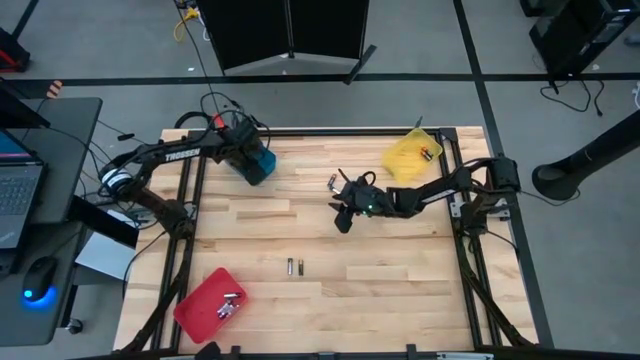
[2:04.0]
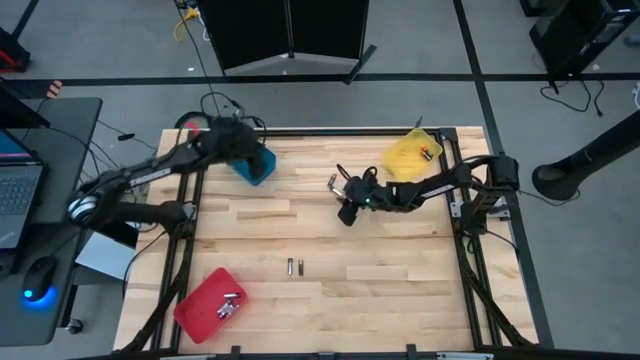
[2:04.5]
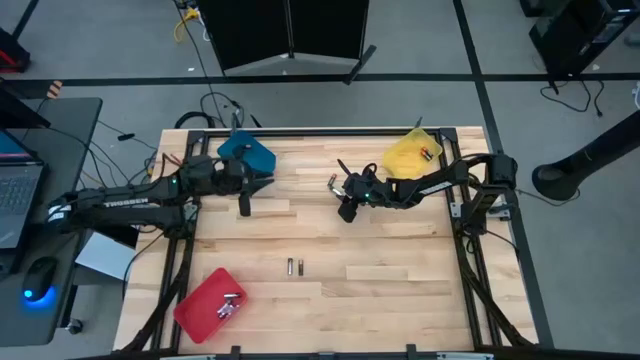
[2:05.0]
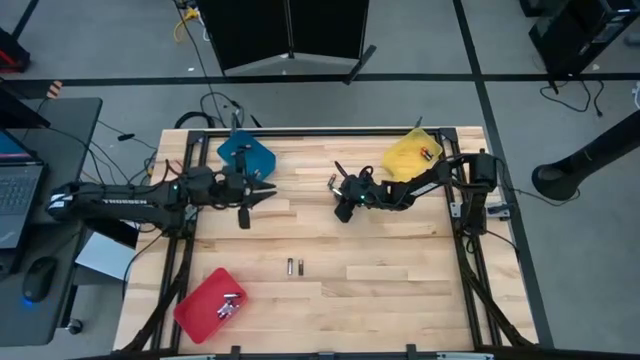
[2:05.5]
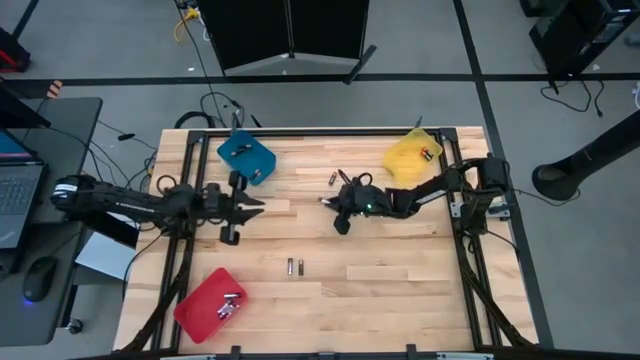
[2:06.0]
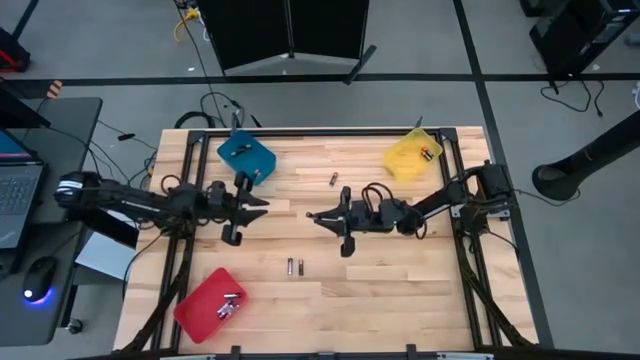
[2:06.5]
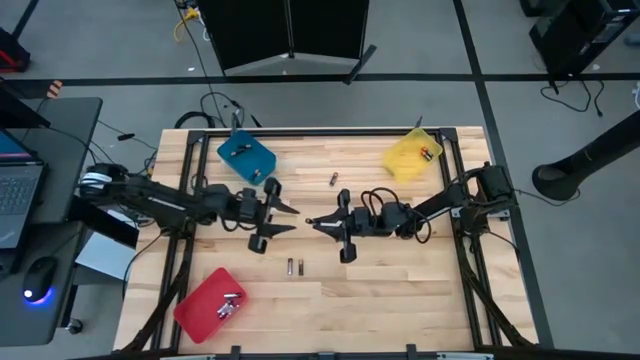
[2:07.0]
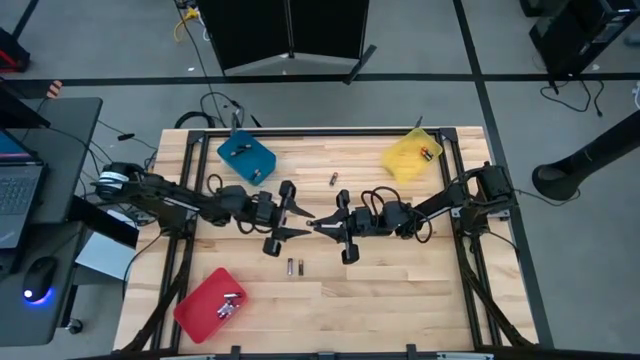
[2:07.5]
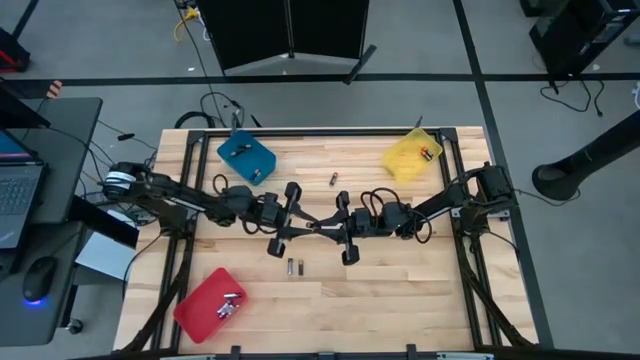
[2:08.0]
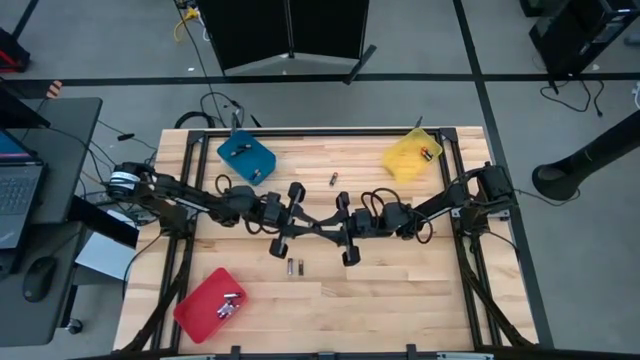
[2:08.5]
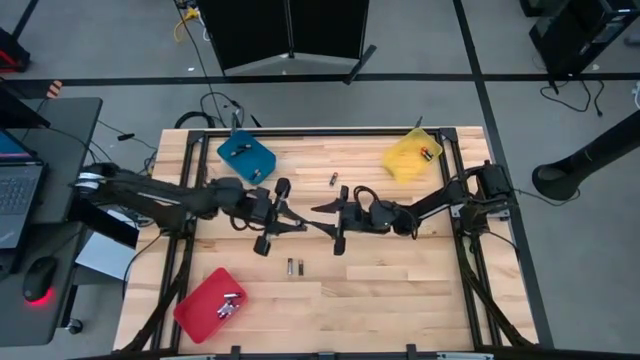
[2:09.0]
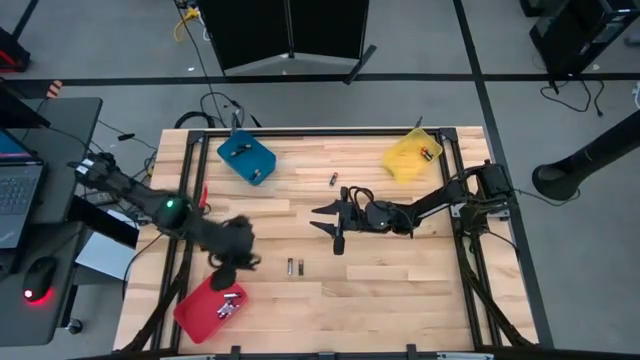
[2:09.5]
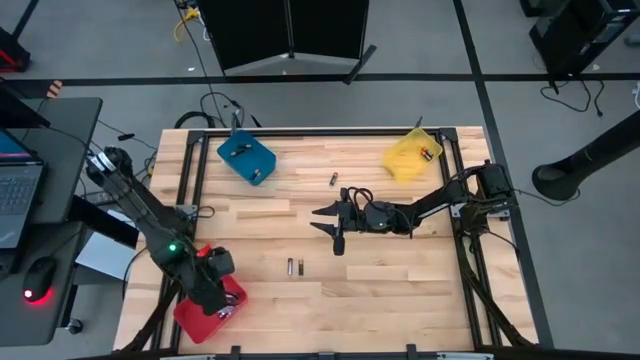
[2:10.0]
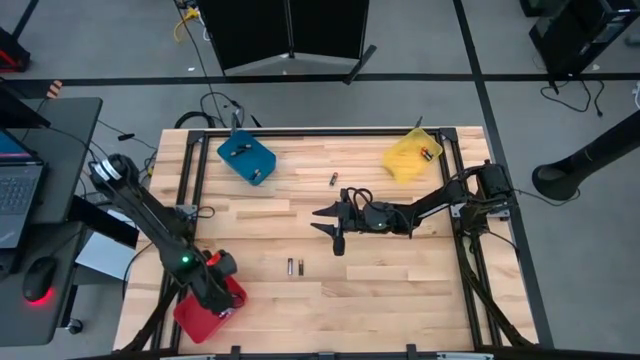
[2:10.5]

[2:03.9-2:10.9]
Task: Sort batteries
Put the top black silver battery into the red bin

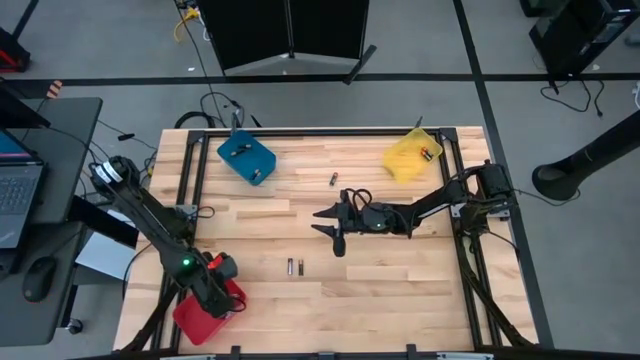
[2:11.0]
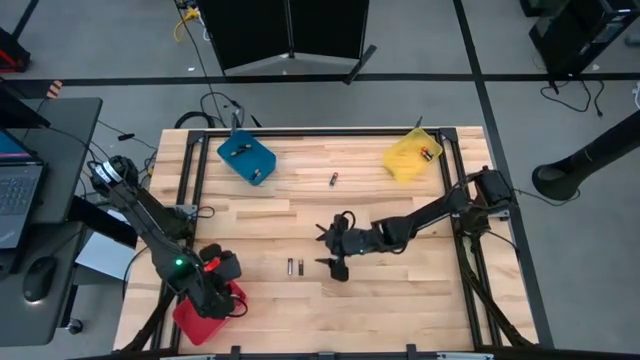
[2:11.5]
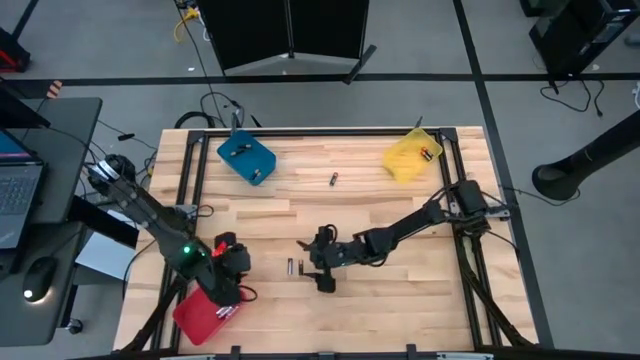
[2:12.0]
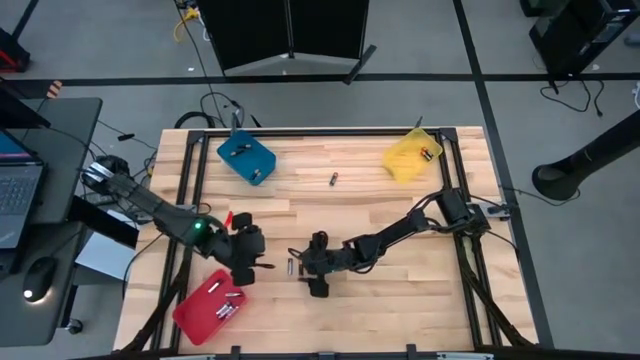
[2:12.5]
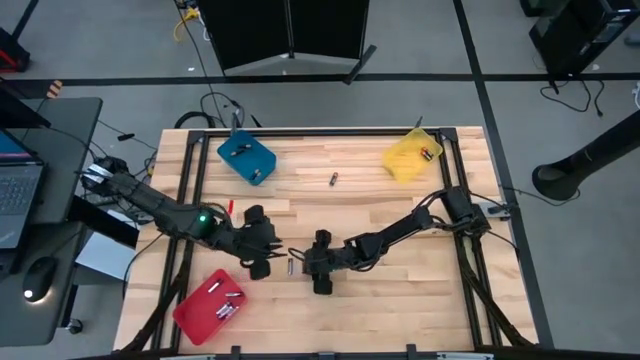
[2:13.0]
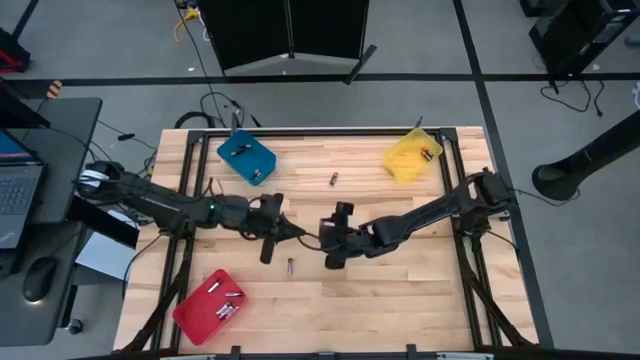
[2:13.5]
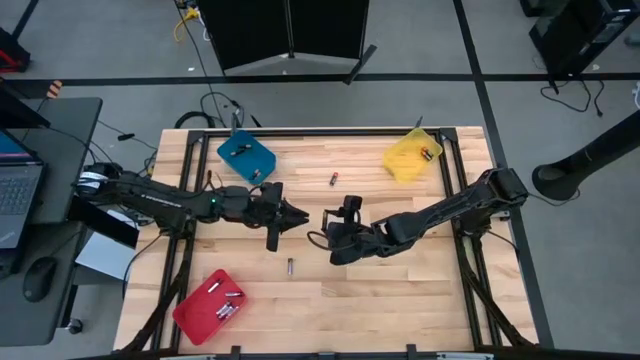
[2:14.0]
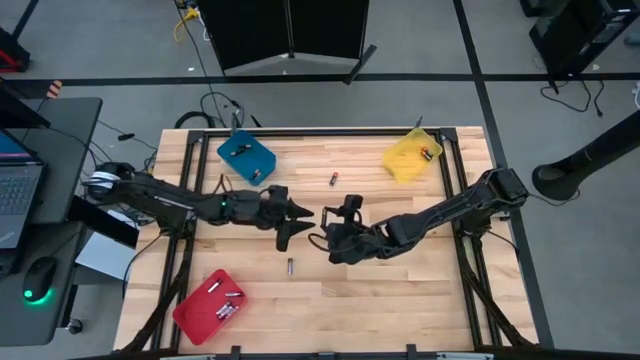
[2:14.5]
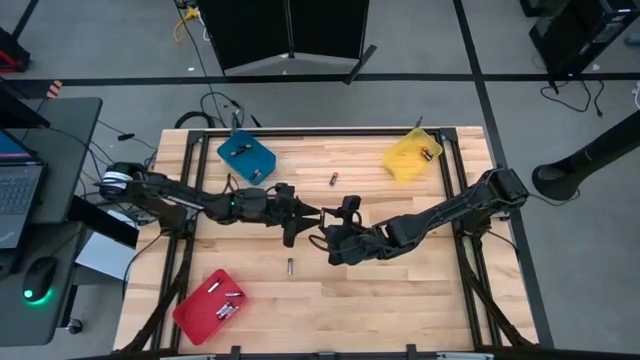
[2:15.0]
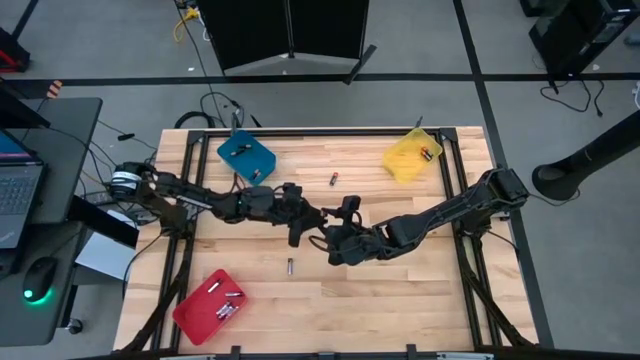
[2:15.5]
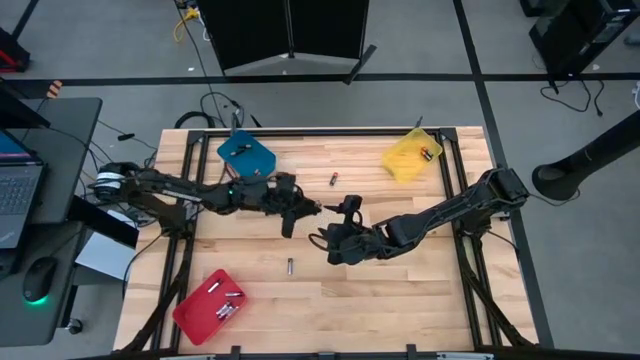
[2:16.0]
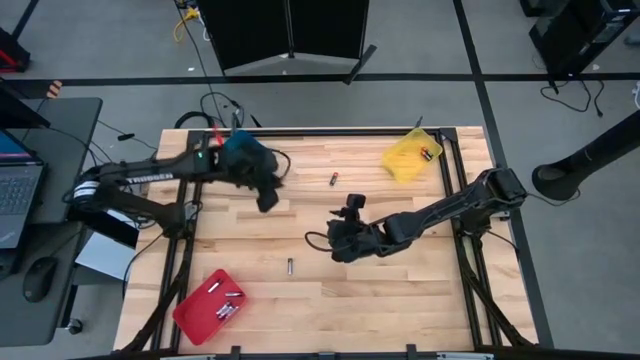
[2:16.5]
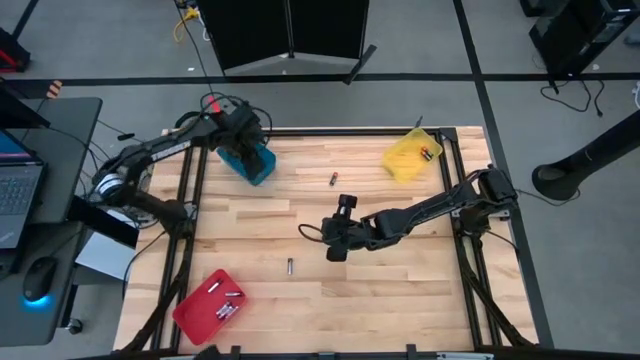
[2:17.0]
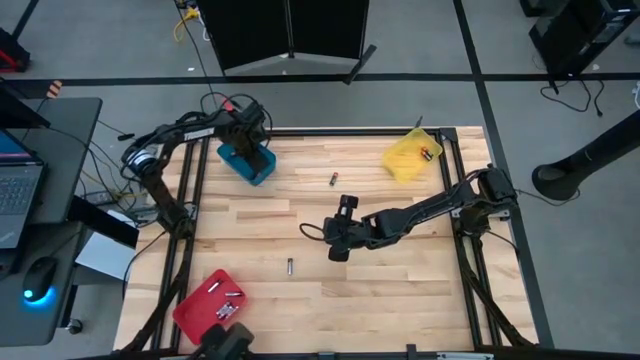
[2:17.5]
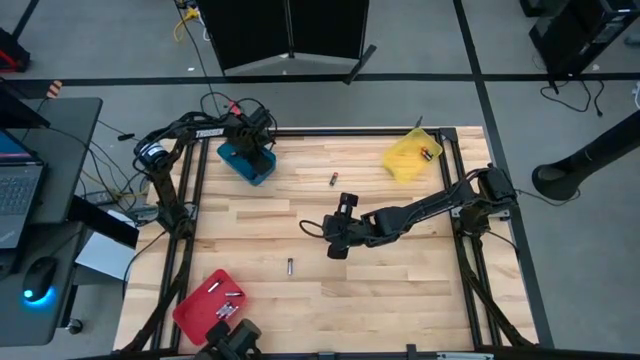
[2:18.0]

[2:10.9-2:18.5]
Put the black brown battery into the blue bin

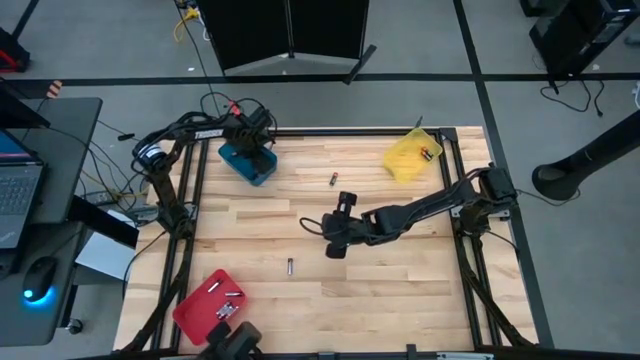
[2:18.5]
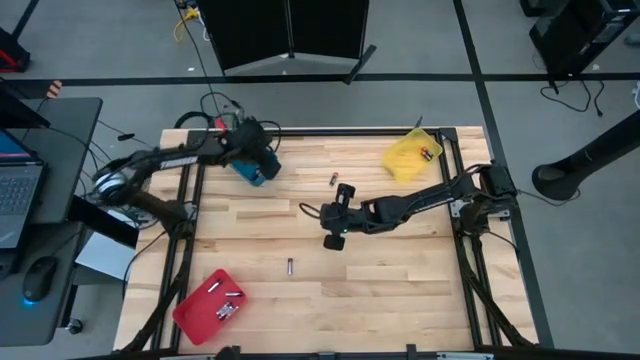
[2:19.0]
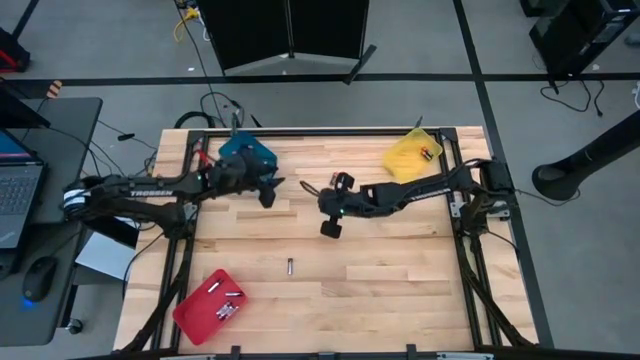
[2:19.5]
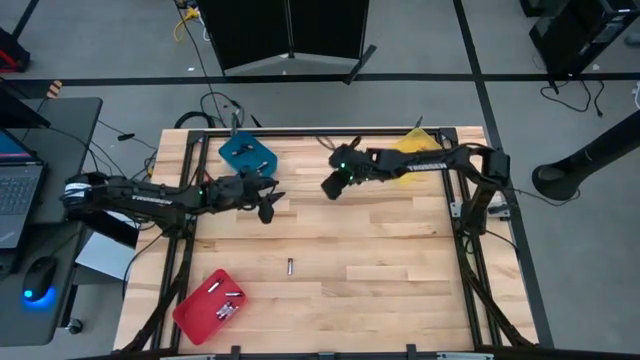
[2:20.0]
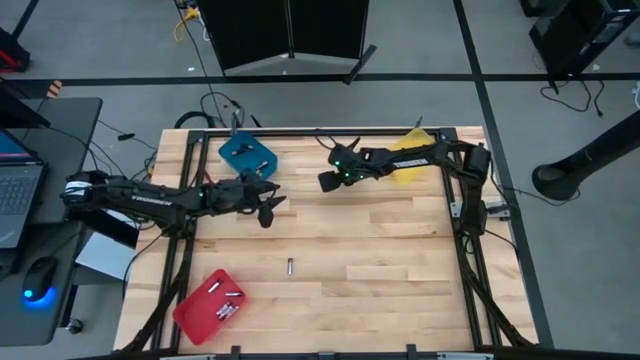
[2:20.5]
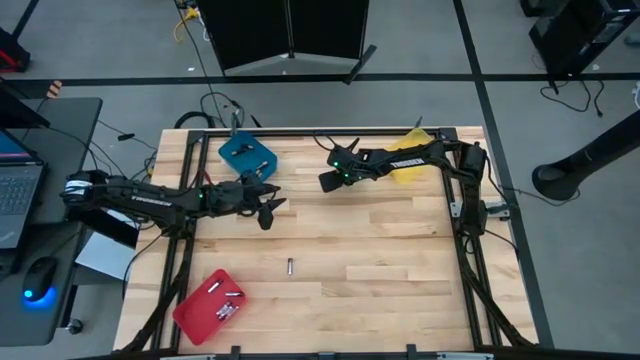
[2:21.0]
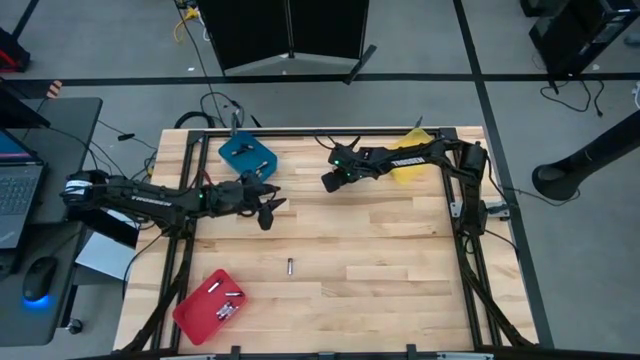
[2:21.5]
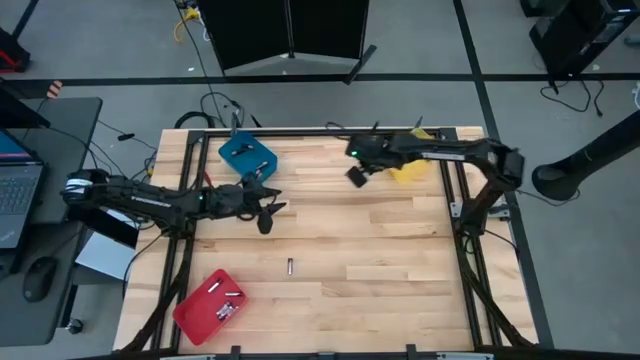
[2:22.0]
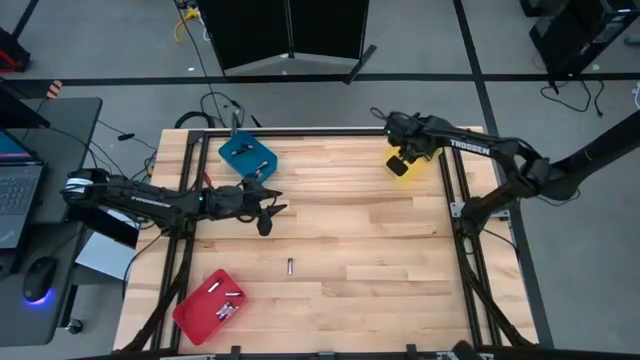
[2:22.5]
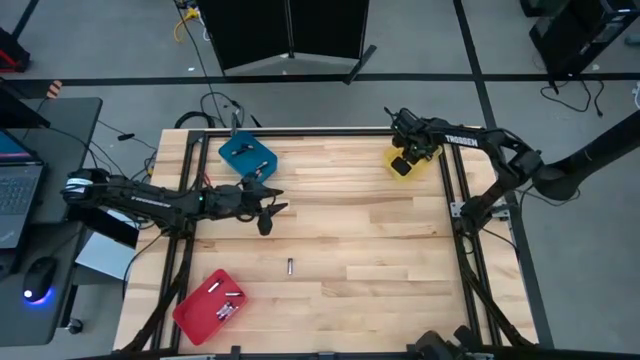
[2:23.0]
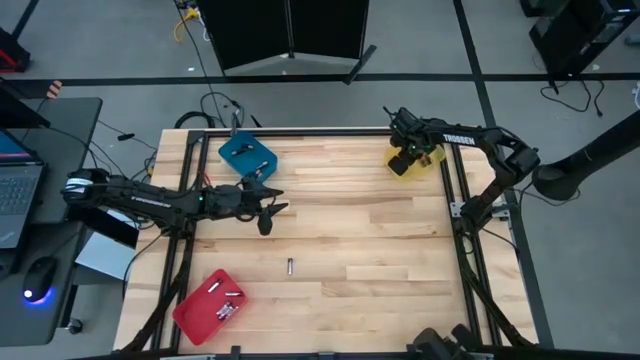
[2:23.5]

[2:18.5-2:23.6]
Put the black orange battery into the yellow bin

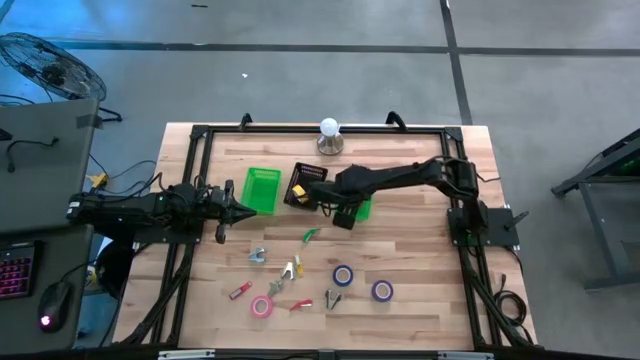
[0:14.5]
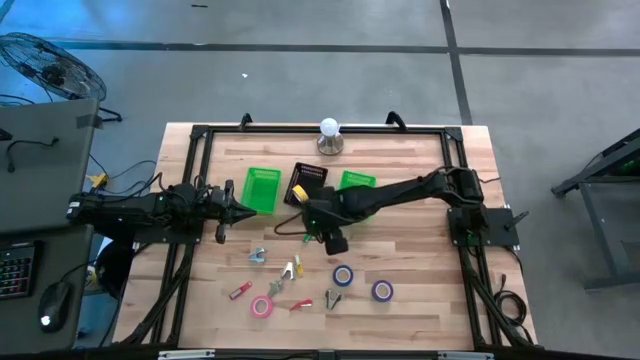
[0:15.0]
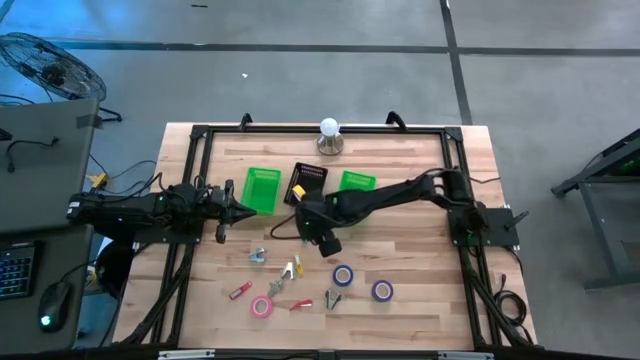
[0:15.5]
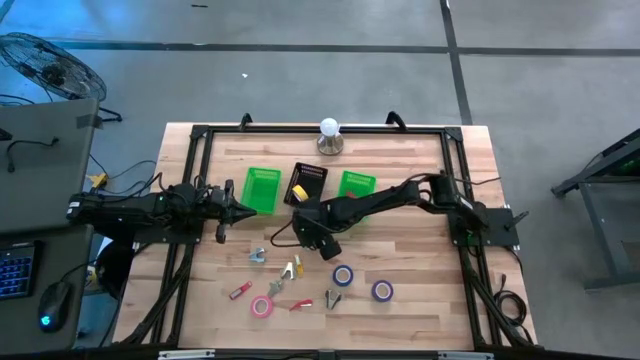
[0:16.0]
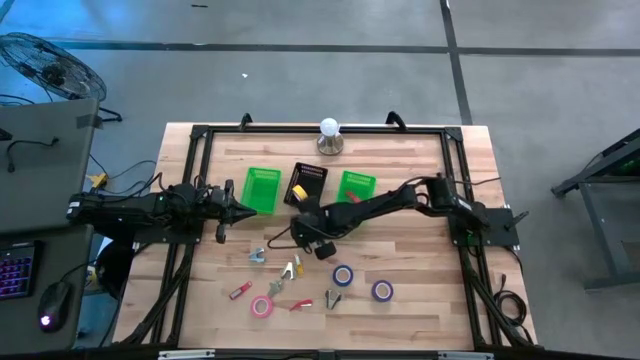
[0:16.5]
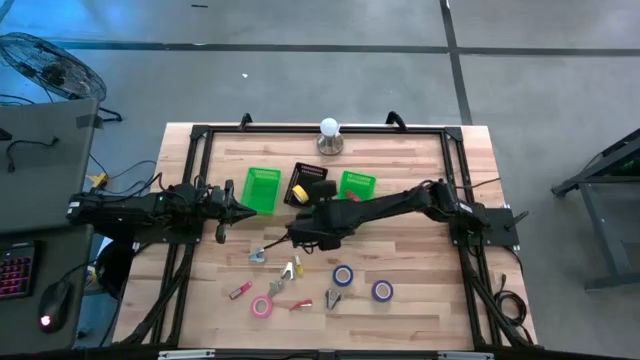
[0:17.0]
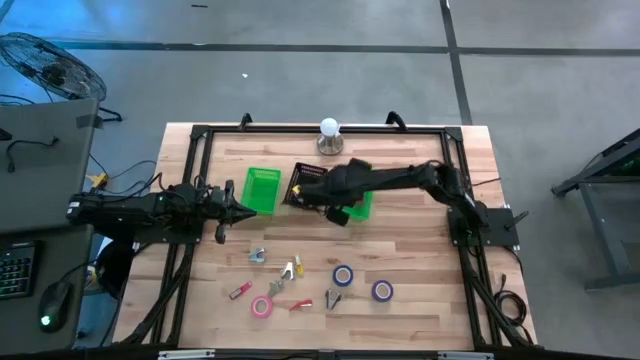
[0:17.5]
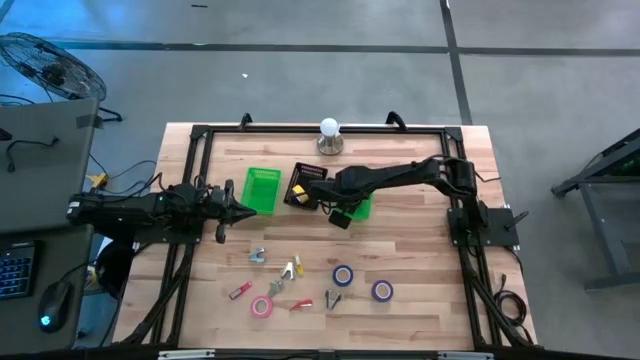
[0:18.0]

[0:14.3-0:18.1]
Task: Pick and place Stapler, Stapler remover, tape
Put the green stapler into the right green bin
